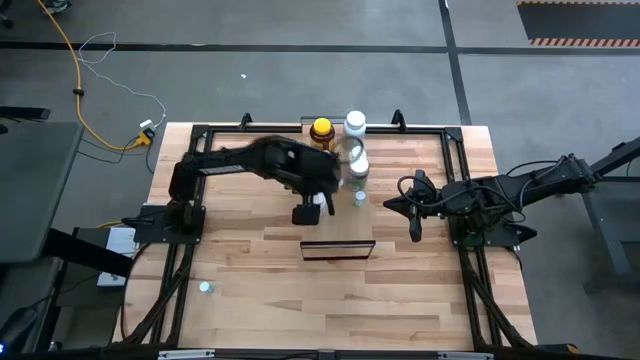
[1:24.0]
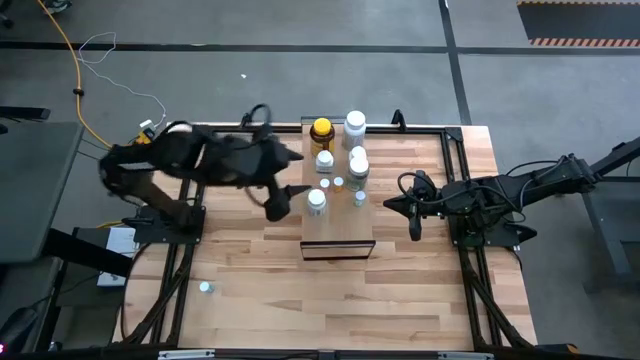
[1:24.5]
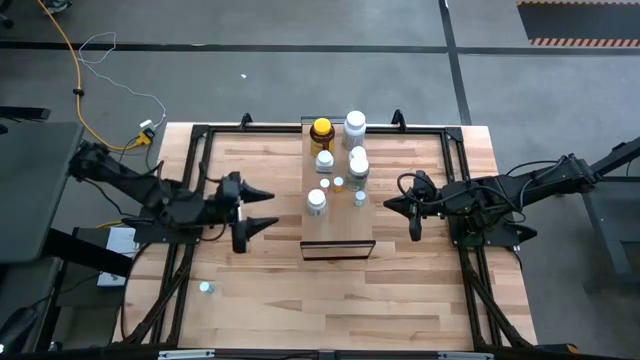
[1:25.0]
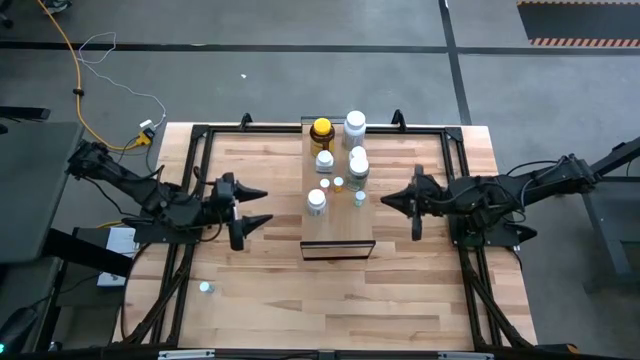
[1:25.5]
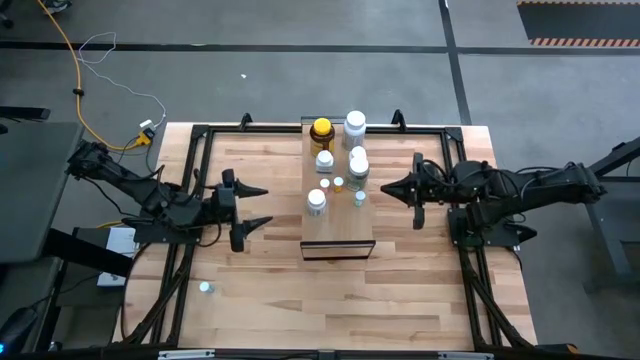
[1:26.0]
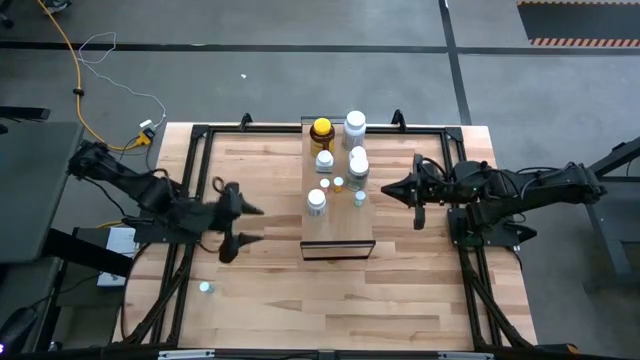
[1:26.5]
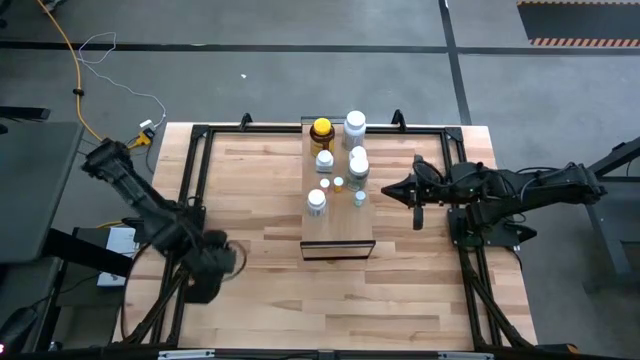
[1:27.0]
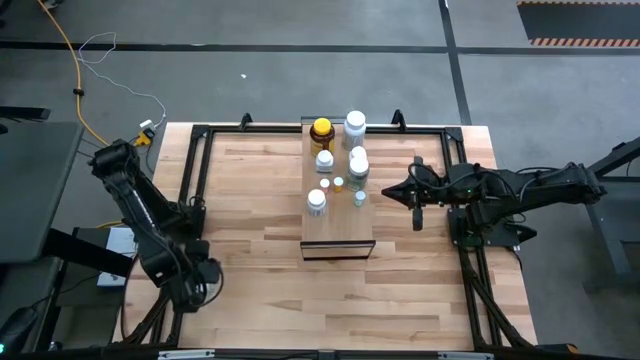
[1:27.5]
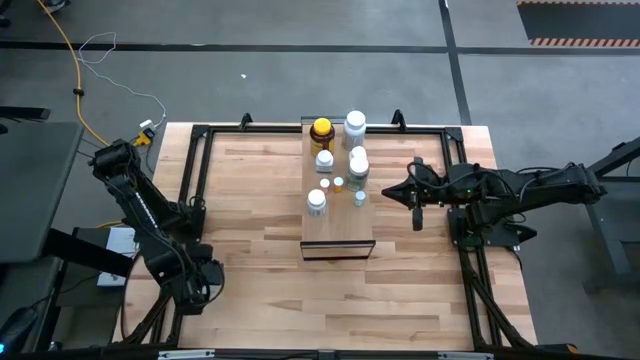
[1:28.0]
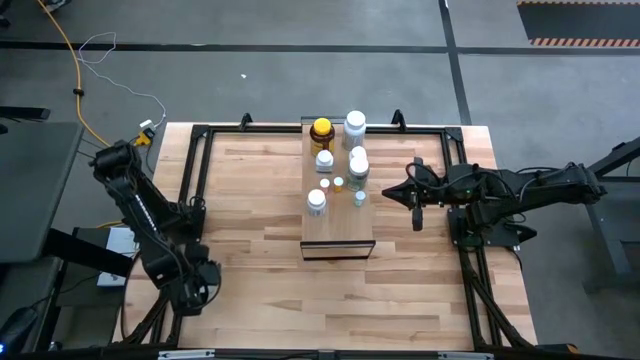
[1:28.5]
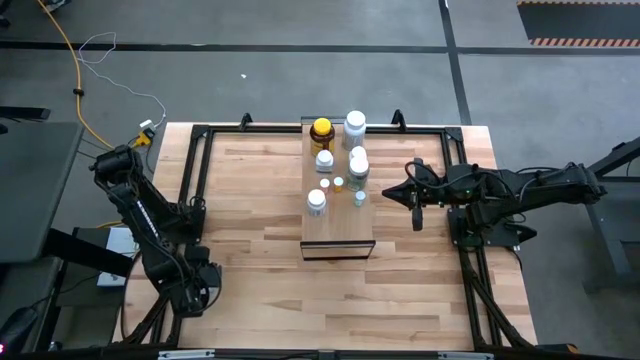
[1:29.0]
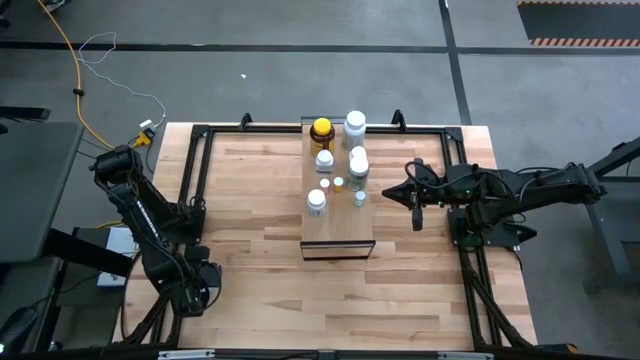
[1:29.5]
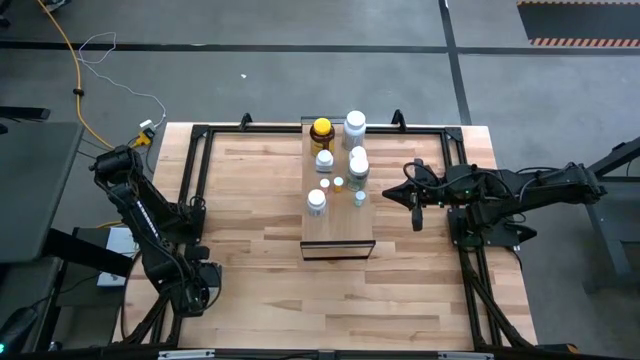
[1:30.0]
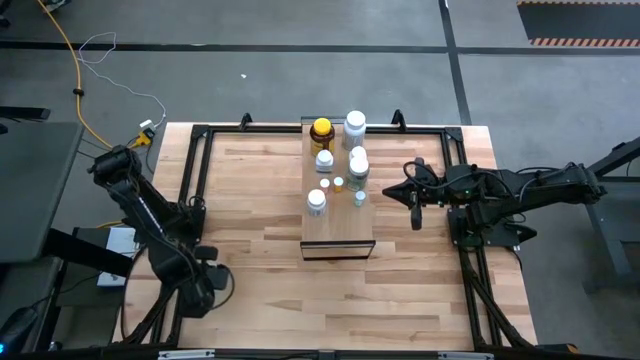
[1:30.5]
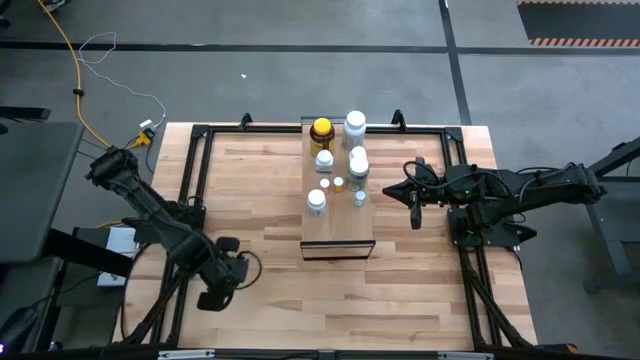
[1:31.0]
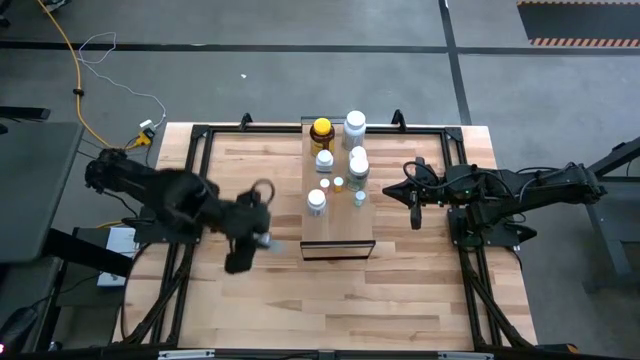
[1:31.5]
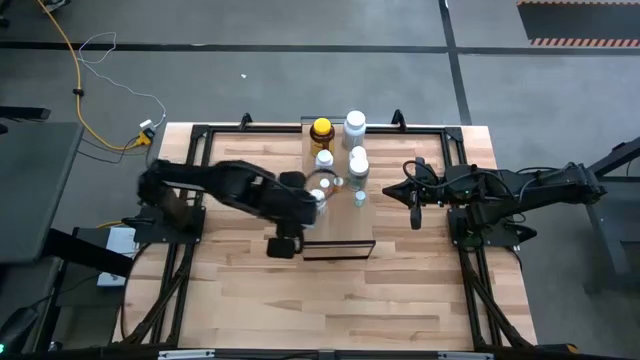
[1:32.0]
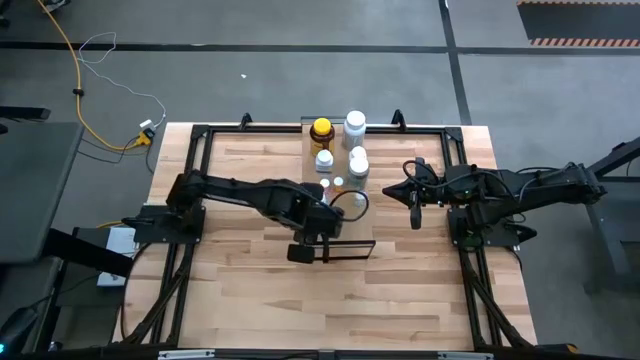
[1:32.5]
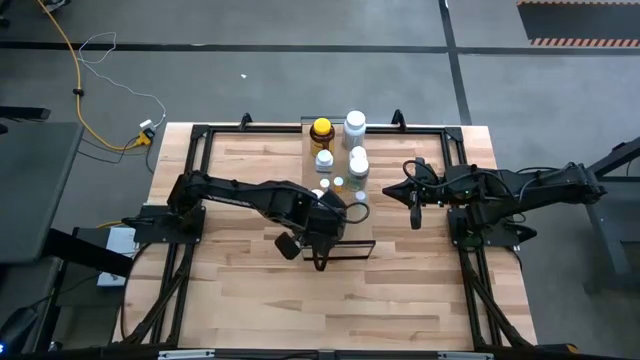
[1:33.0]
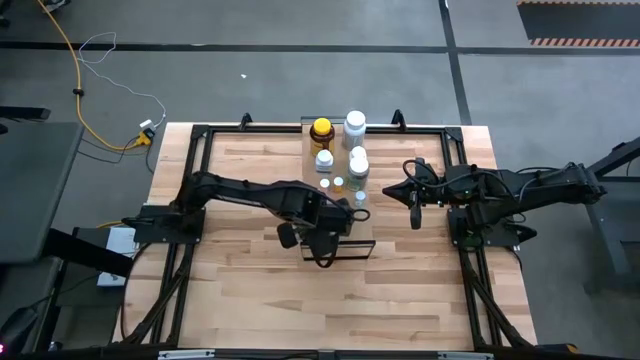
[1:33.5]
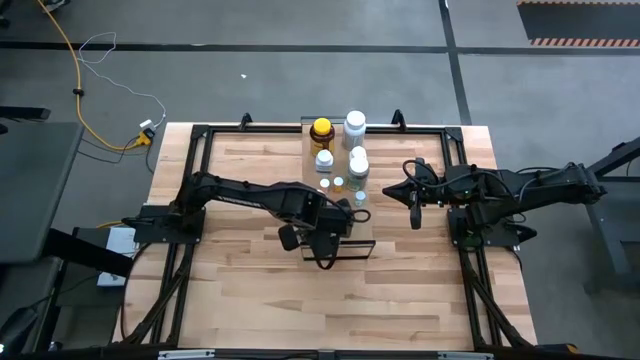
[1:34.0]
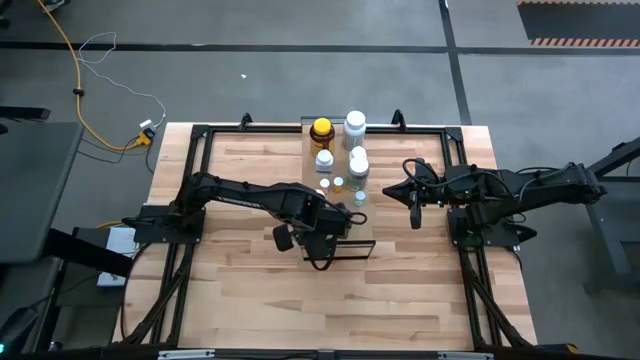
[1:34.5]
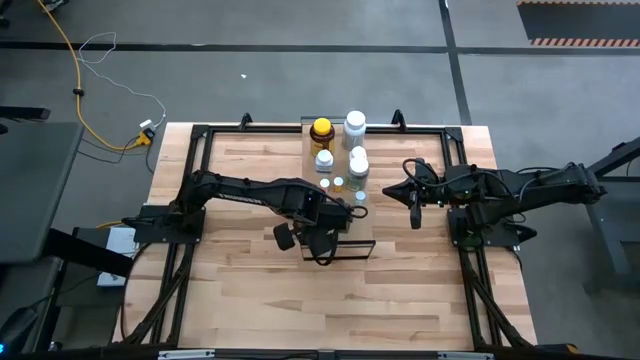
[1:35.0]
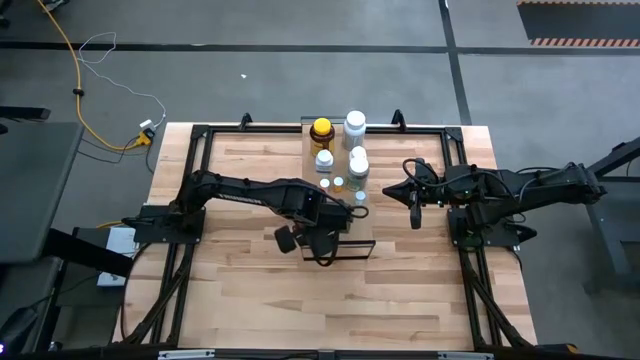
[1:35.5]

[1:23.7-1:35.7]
Task: Pick and place medicine bottles onto shelf by color
Put the light blue pill bottle on the shelf

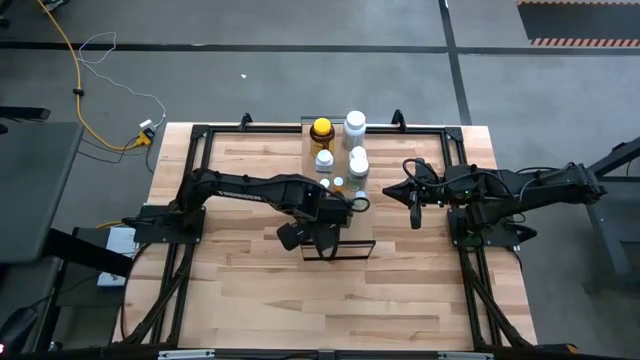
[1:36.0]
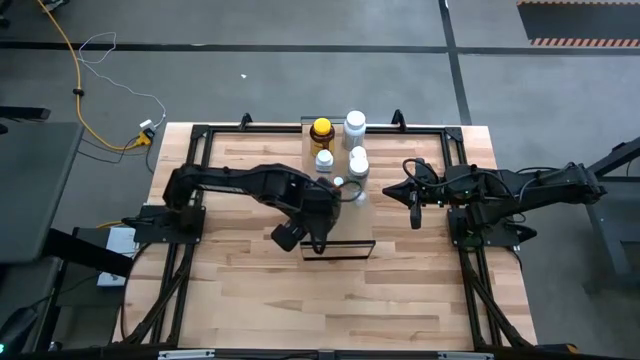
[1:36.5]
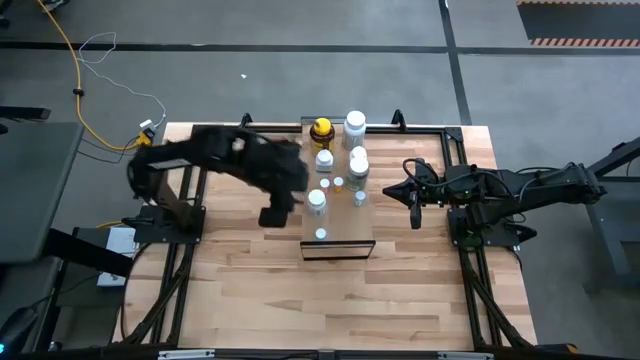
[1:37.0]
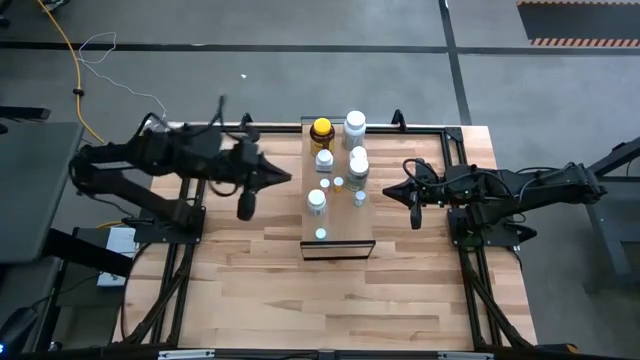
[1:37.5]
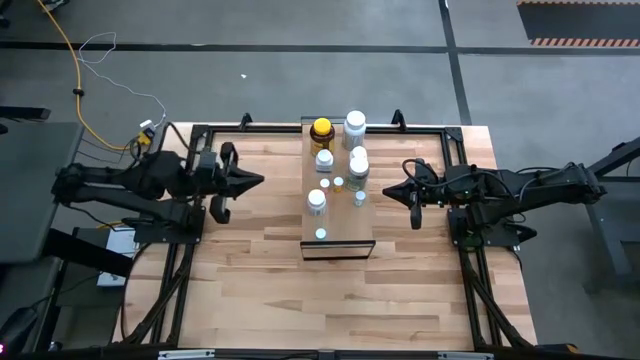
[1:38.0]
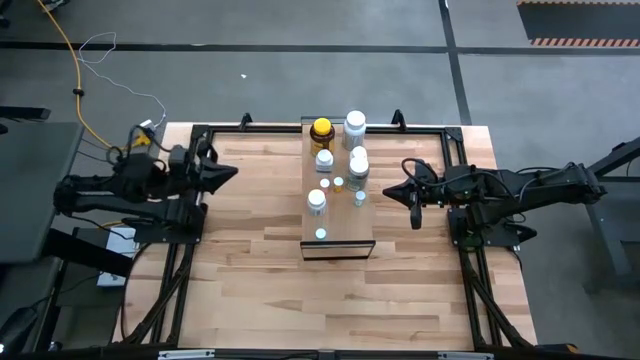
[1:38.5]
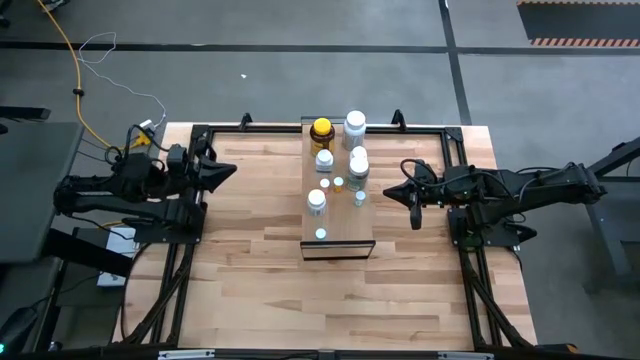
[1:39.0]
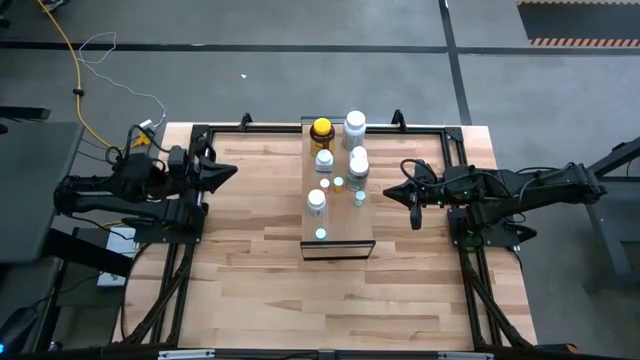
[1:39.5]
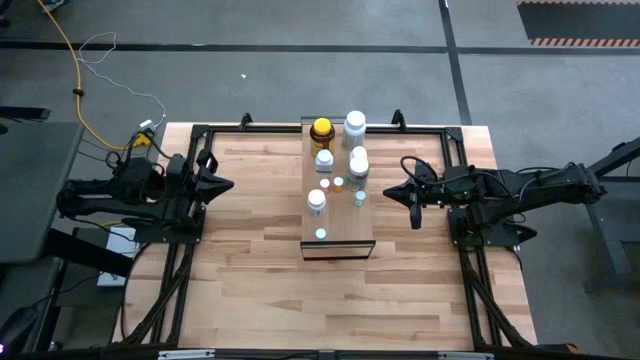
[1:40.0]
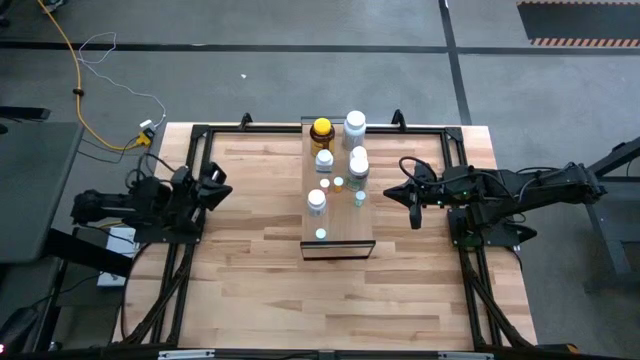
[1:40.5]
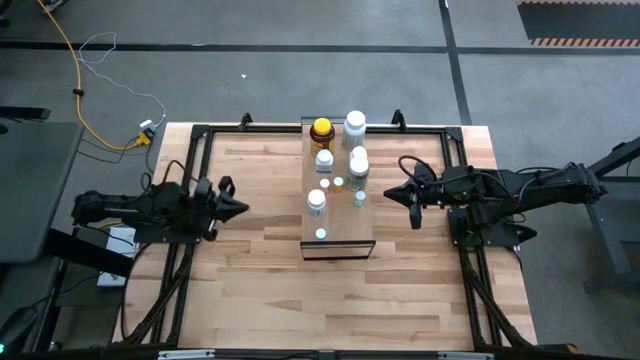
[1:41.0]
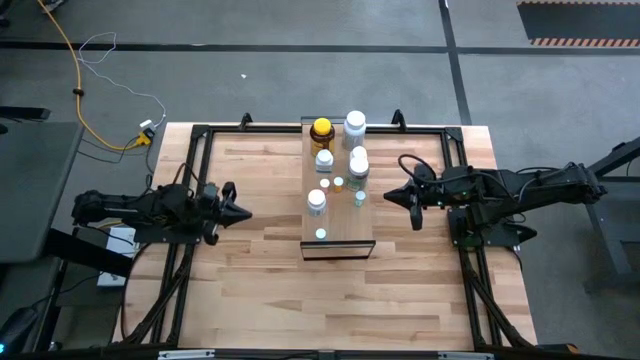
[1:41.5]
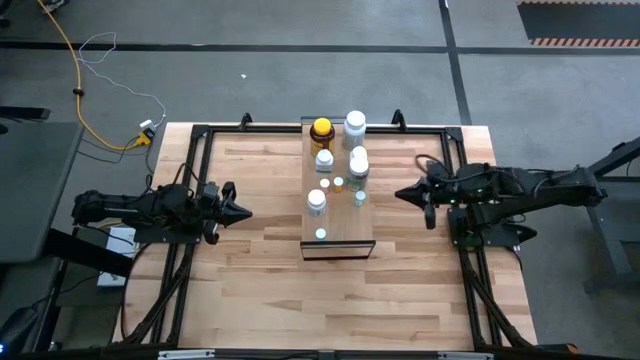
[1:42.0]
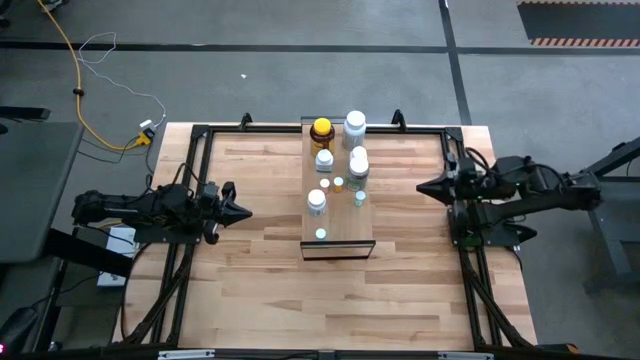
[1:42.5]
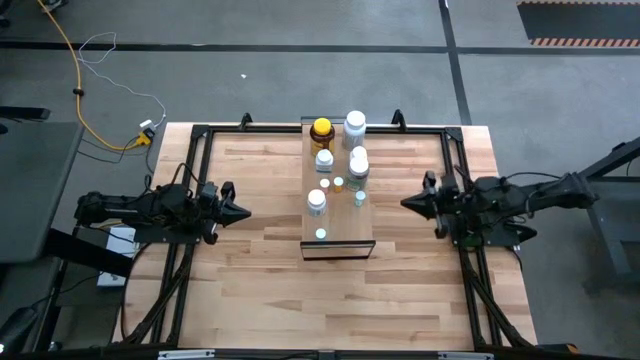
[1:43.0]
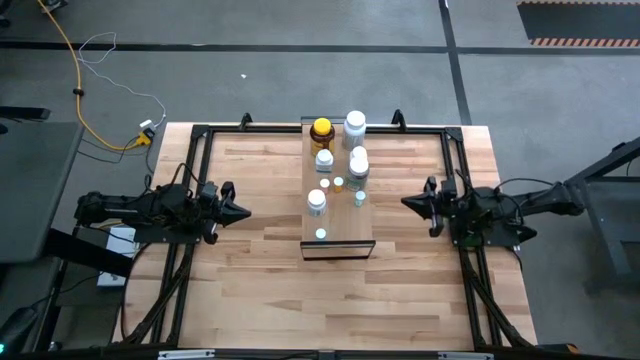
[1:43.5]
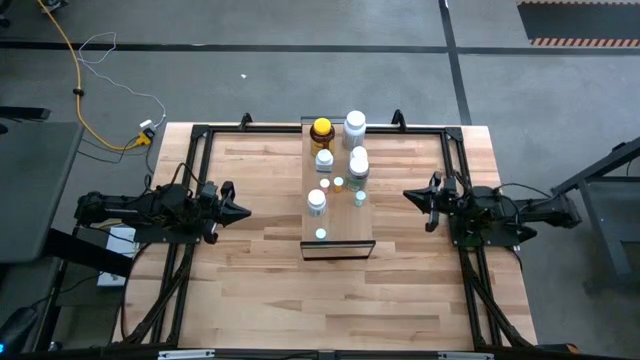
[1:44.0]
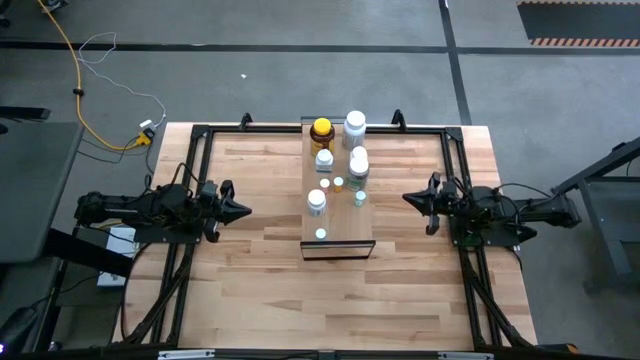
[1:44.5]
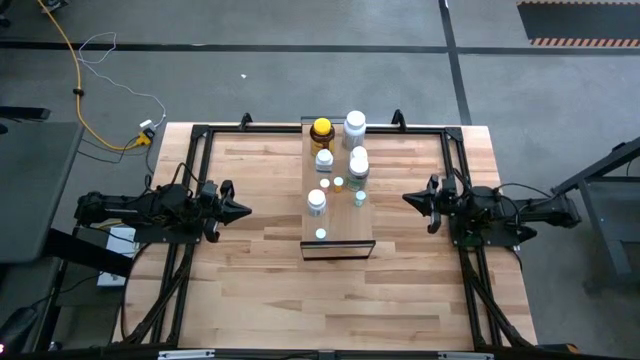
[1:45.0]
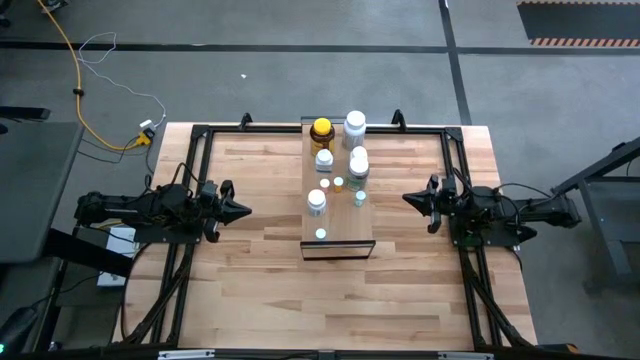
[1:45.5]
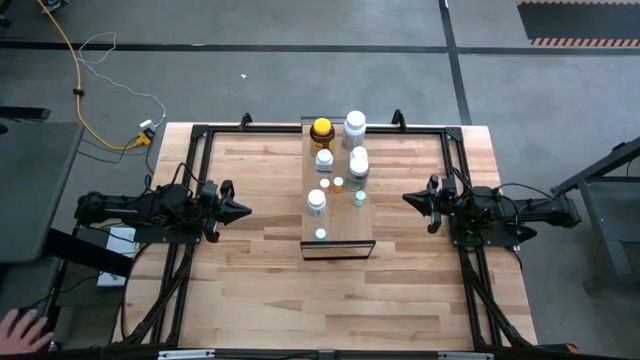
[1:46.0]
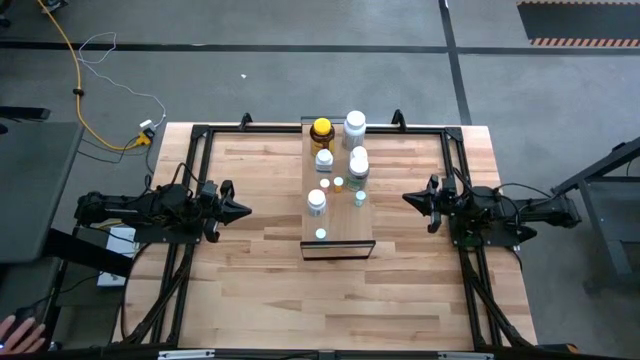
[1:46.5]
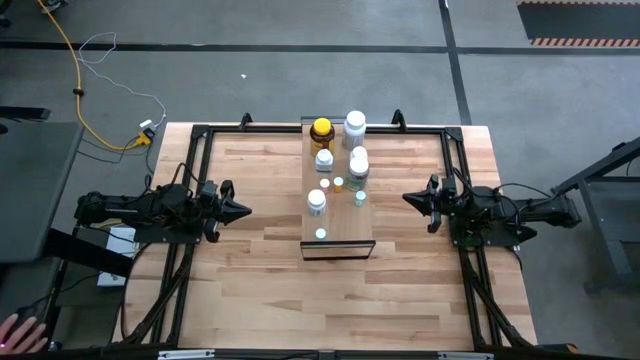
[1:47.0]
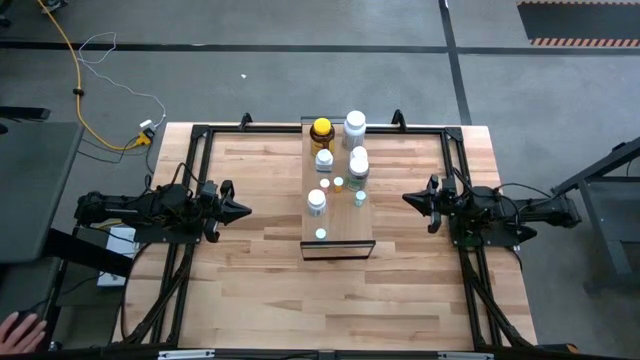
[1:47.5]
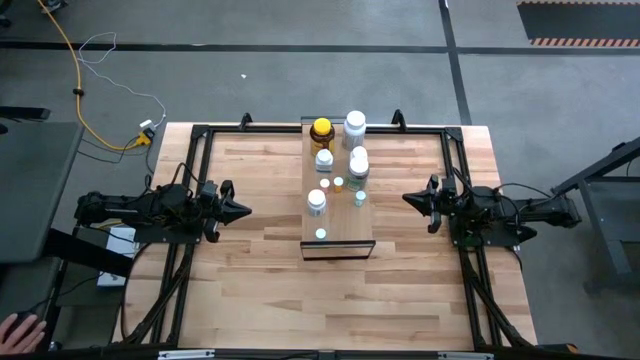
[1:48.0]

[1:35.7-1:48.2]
Return to Home Position
